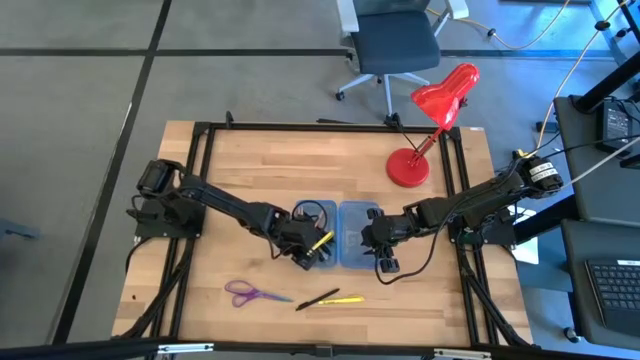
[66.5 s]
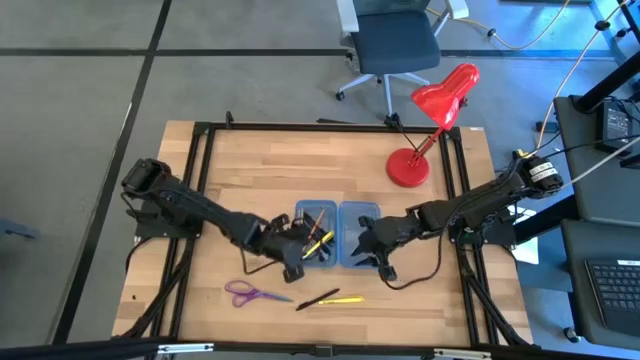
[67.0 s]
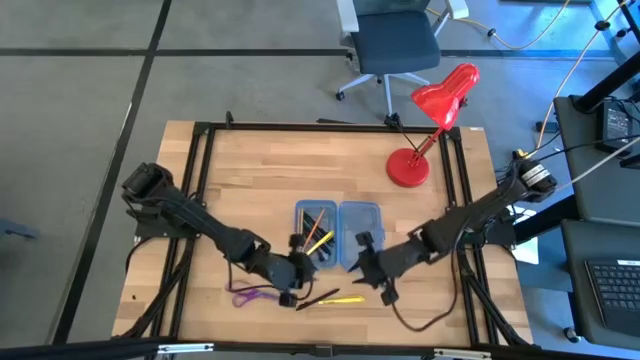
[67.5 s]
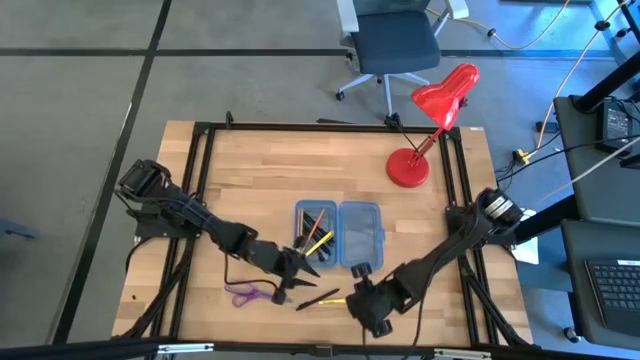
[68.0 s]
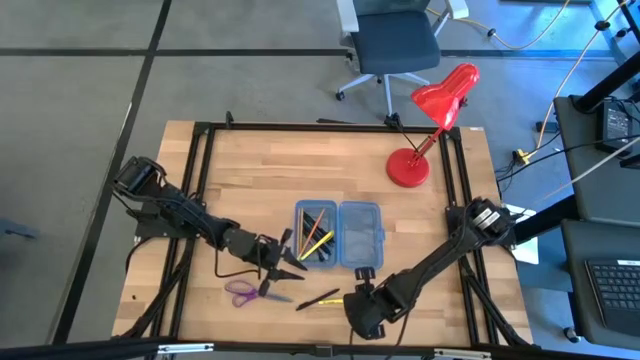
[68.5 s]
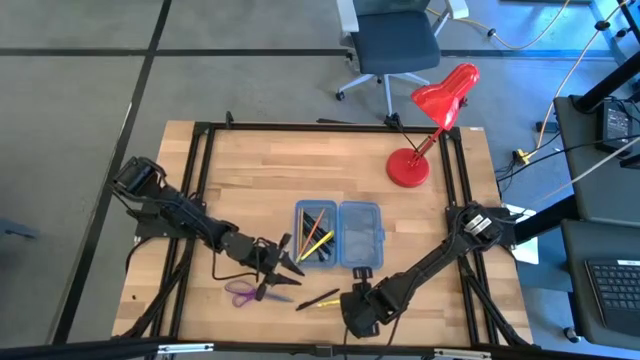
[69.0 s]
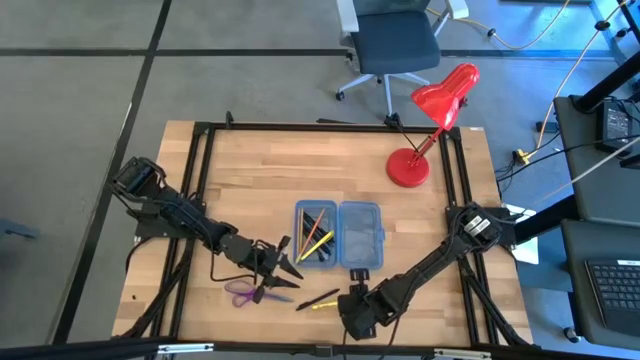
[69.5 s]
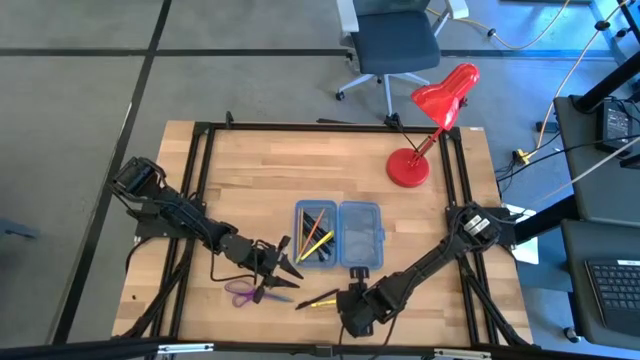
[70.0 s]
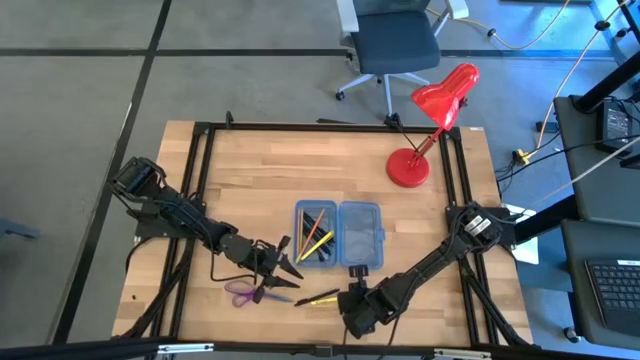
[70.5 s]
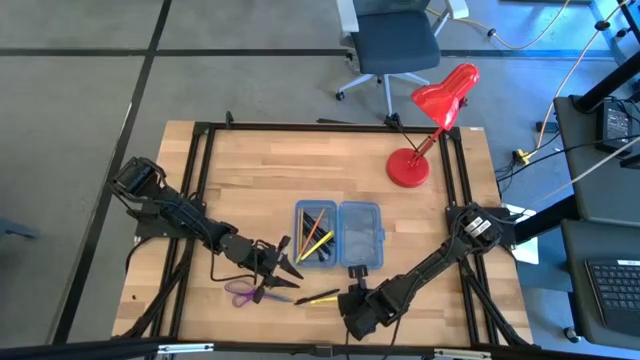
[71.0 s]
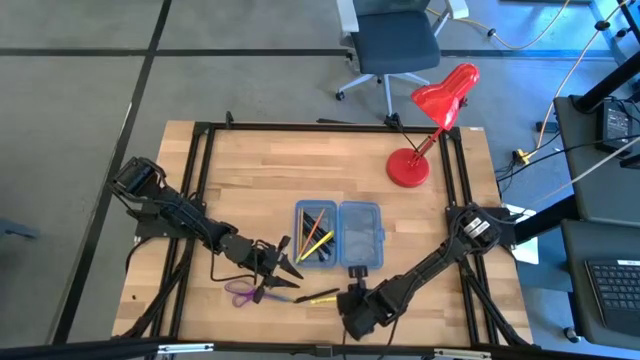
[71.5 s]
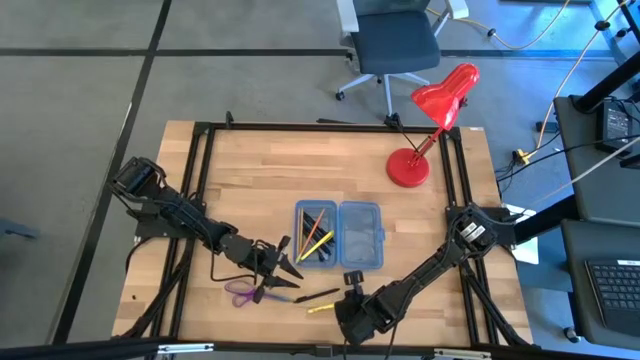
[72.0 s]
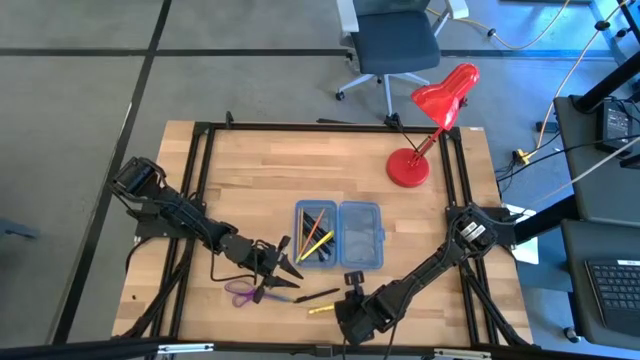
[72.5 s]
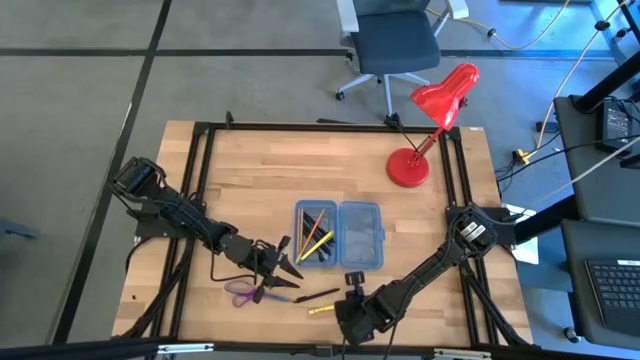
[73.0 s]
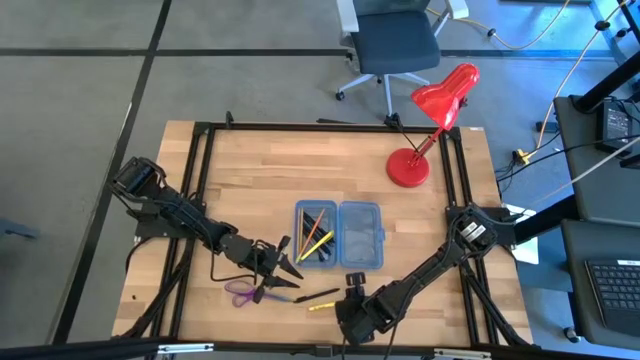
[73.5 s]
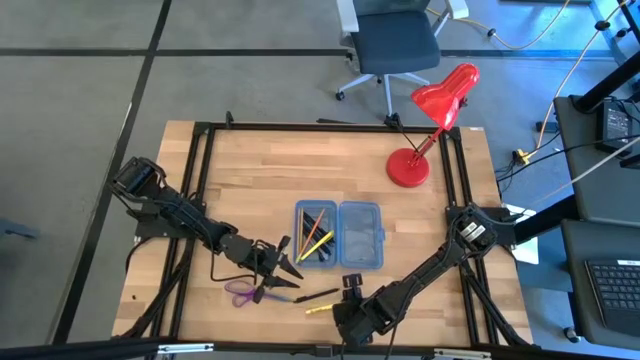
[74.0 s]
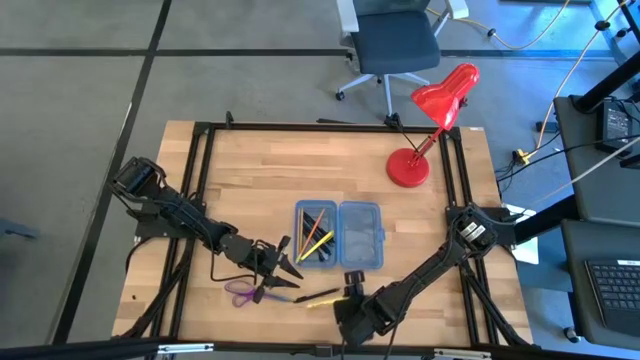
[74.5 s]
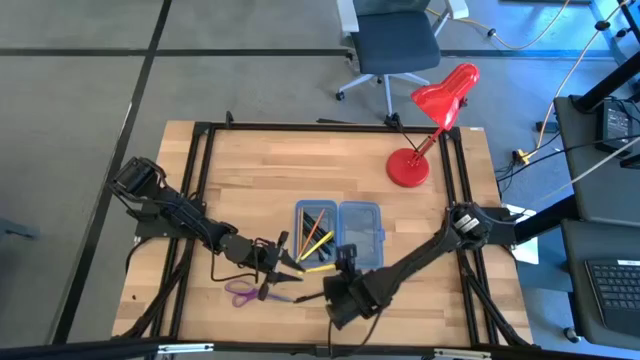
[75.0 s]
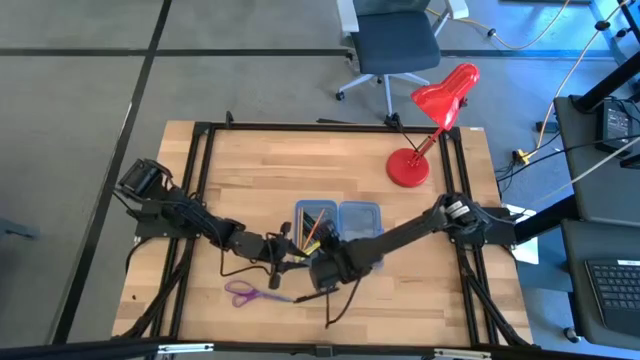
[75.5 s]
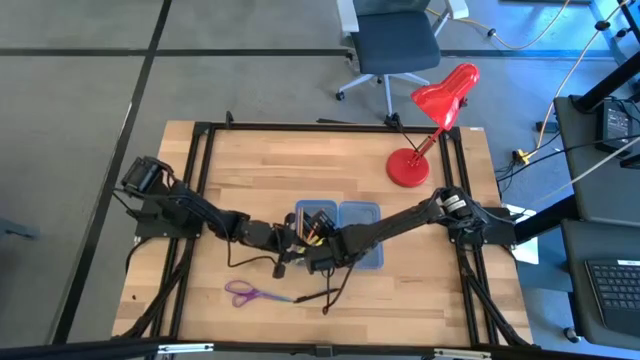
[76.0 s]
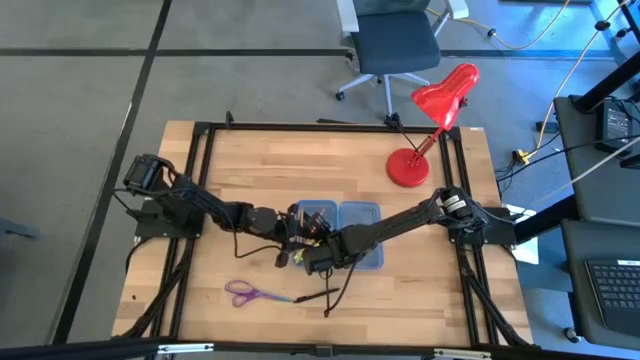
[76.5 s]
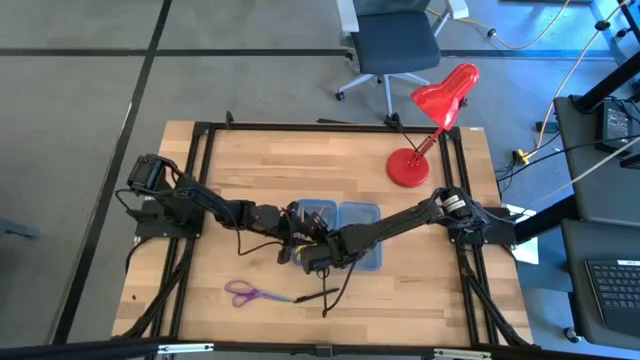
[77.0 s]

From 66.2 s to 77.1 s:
Task: Pick & place school supplies into a supply box
Put the yellow pen into the blue supply box

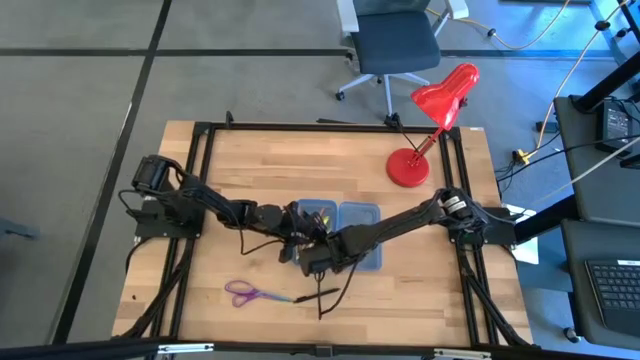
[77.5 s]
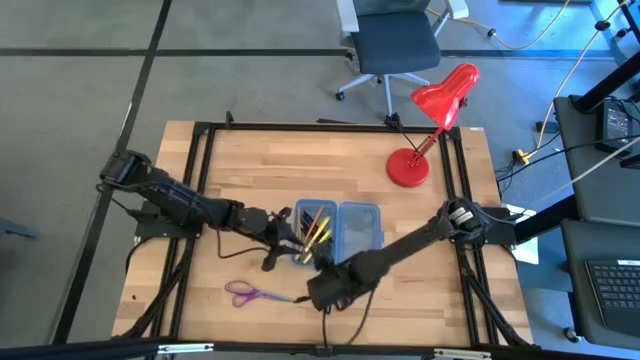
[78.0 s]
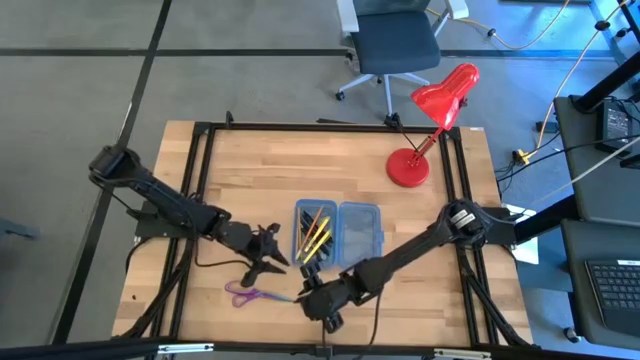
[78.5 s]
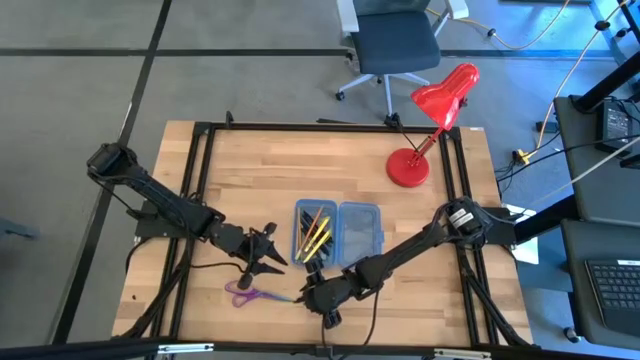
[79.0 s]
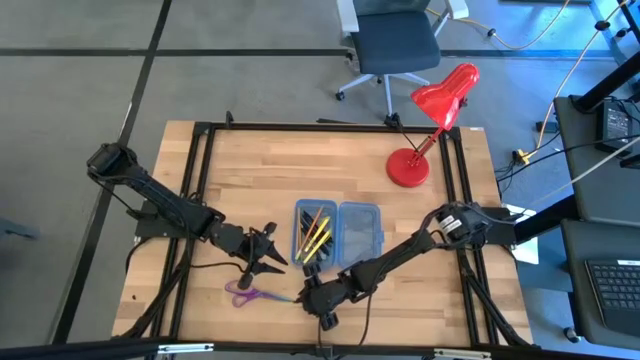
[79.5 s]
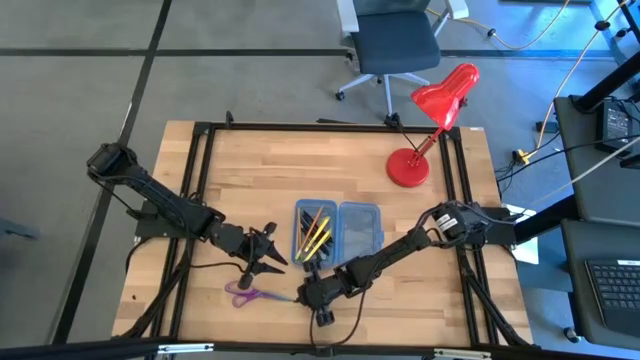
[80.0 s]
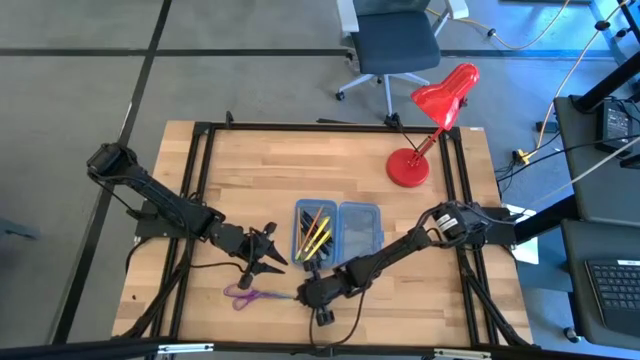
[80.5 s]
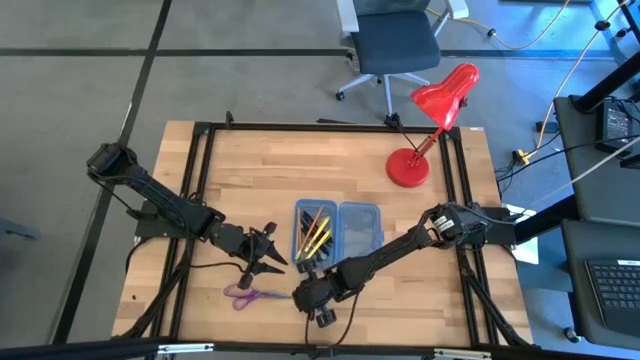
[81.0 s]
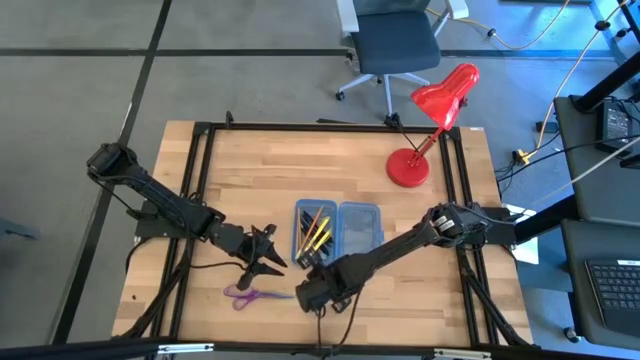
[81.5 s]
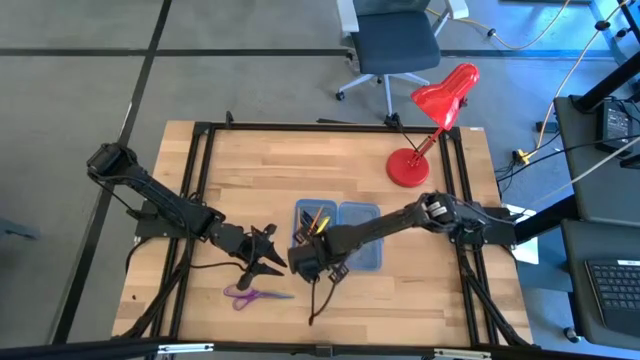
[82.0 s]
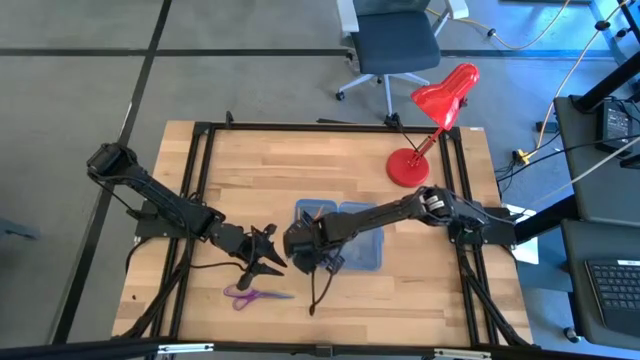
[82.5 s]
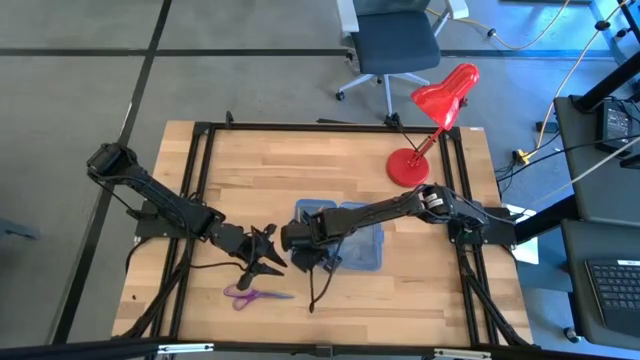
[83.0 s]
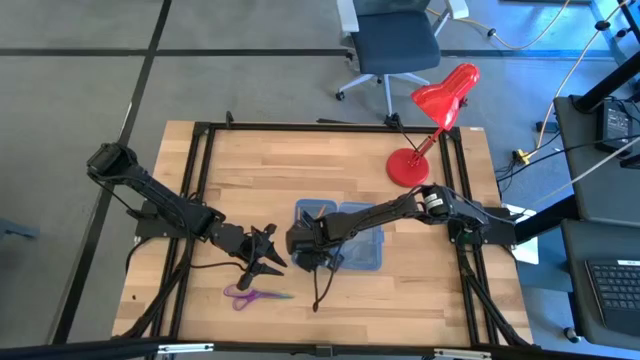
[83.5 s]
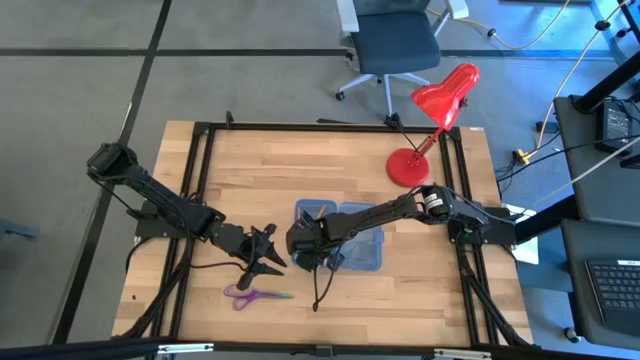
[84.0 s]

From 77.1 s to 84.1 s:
Put the black pen into the blue supply box

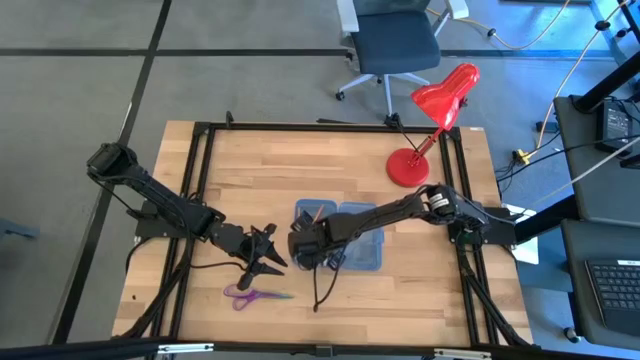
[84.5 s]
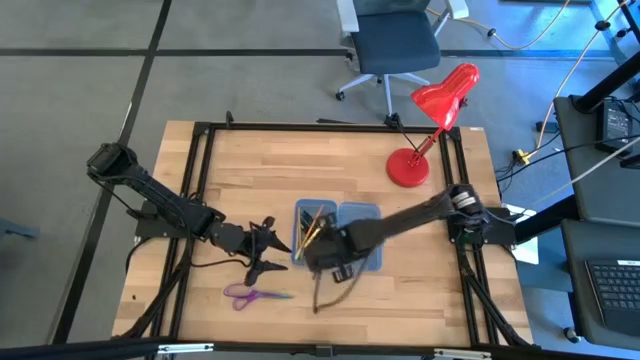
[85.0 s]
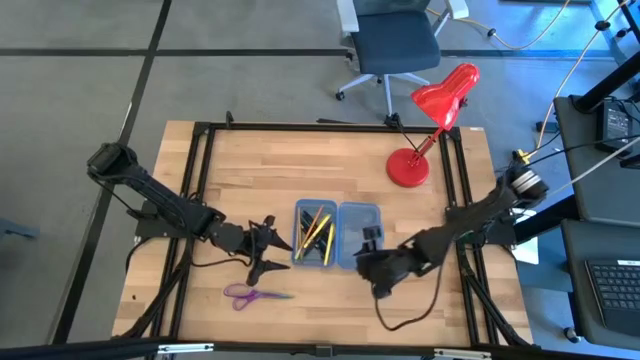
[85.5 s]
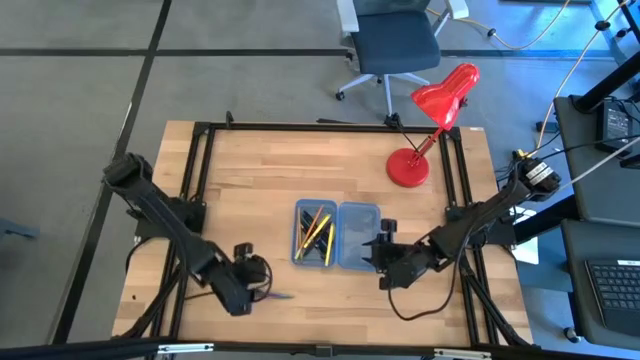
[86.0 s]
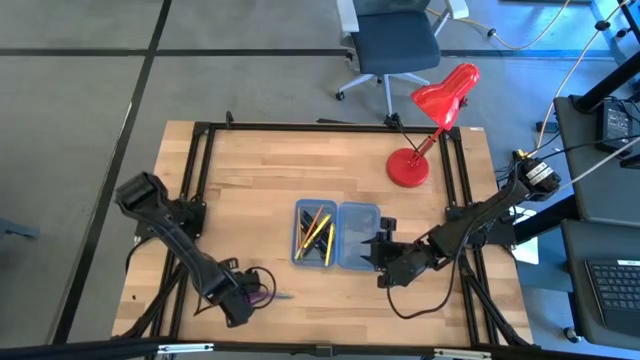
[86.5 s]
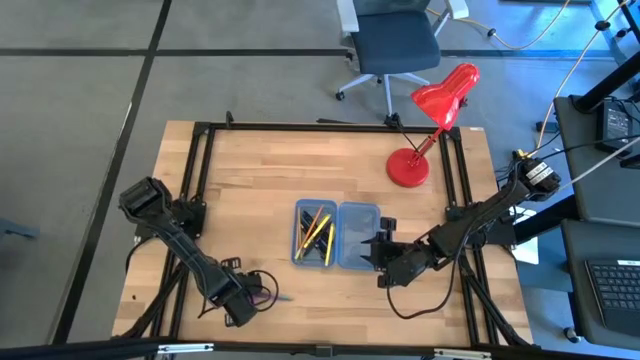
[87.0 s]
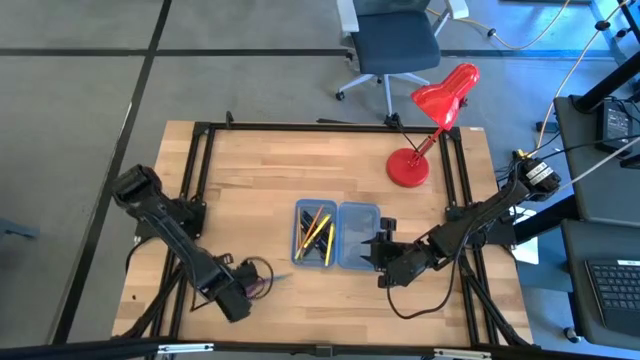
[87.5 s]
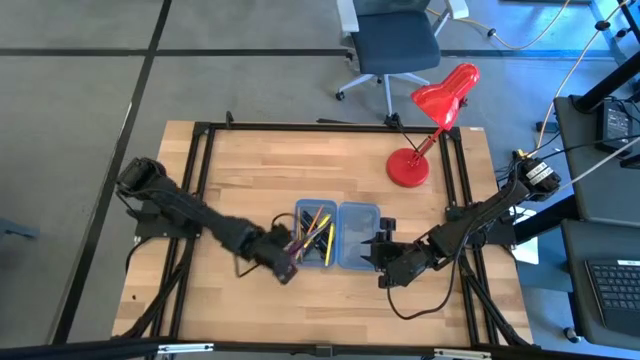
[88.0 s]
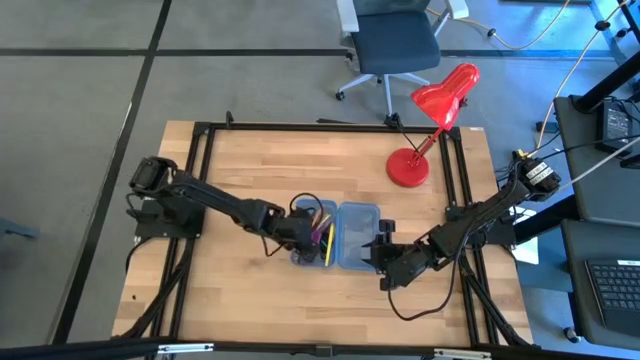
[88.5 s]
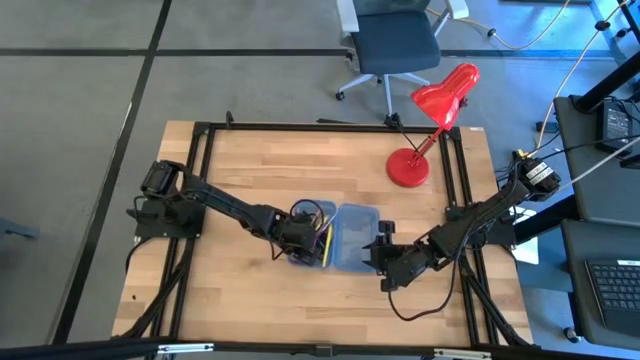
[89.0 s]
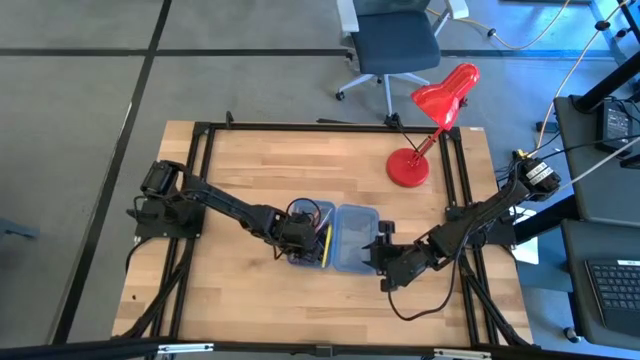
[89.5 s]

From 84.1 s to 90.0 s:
Put the purple scissors into the blue supply box
